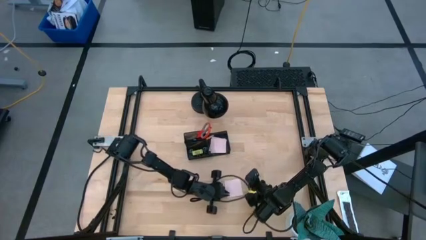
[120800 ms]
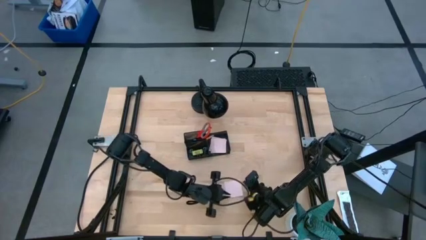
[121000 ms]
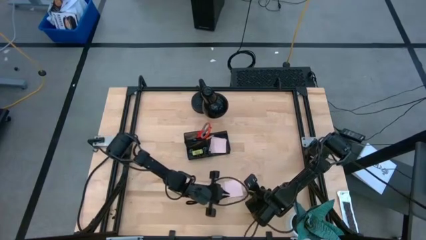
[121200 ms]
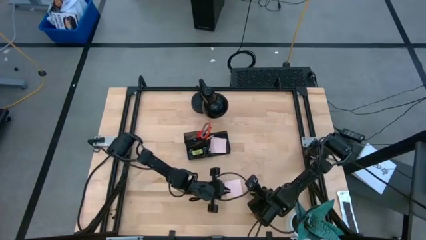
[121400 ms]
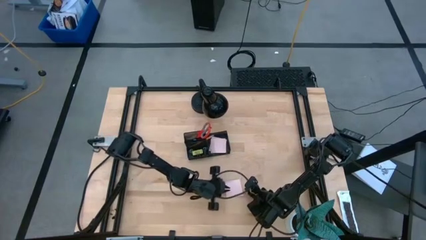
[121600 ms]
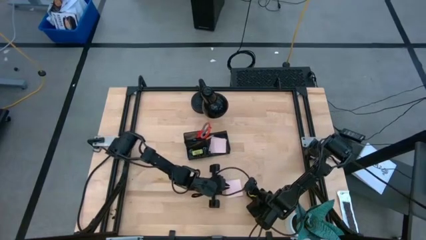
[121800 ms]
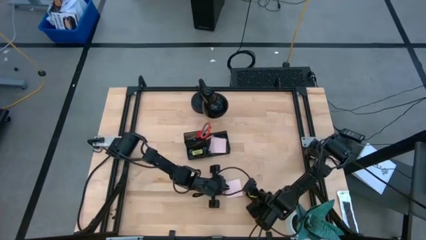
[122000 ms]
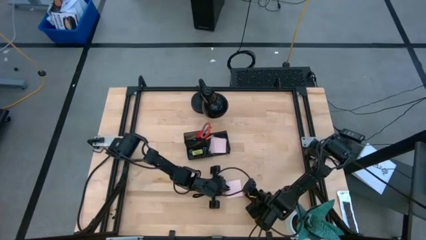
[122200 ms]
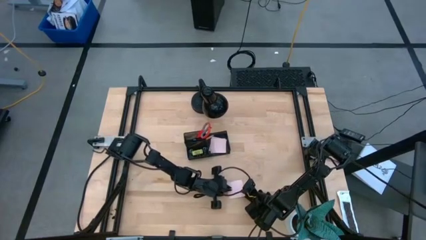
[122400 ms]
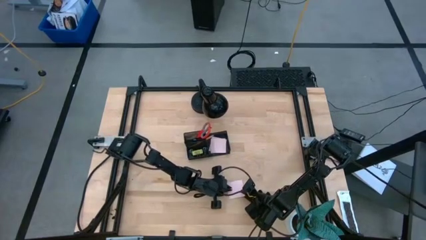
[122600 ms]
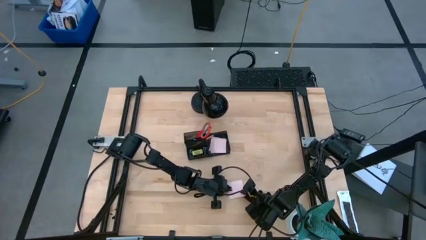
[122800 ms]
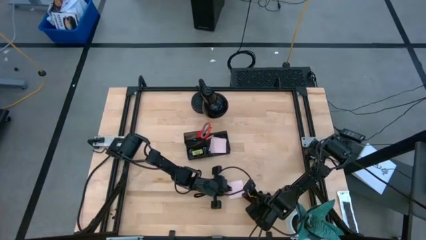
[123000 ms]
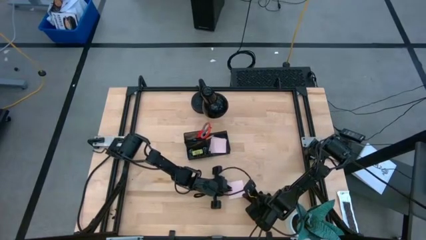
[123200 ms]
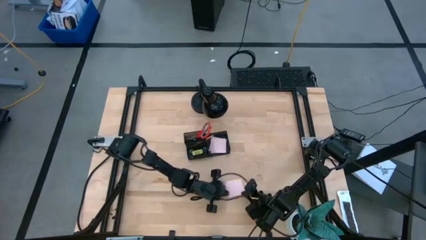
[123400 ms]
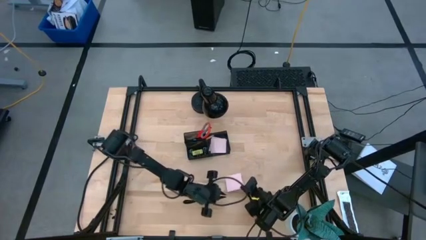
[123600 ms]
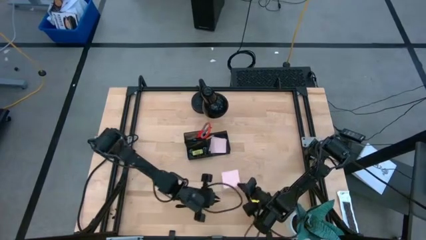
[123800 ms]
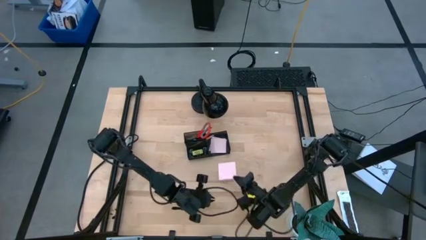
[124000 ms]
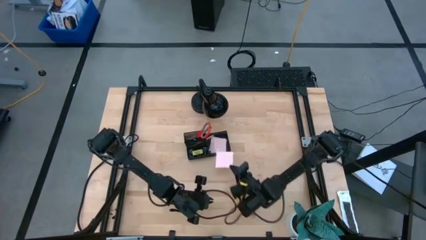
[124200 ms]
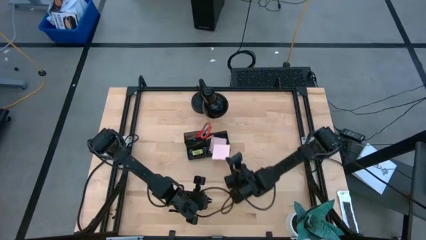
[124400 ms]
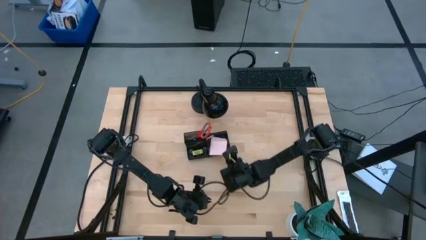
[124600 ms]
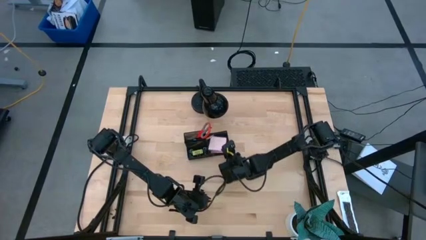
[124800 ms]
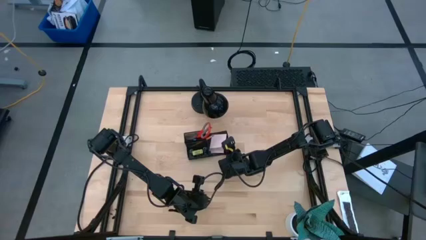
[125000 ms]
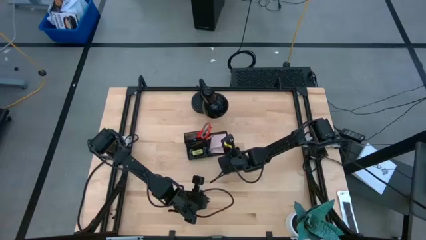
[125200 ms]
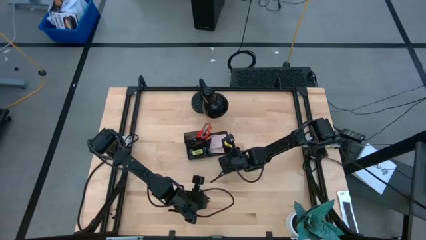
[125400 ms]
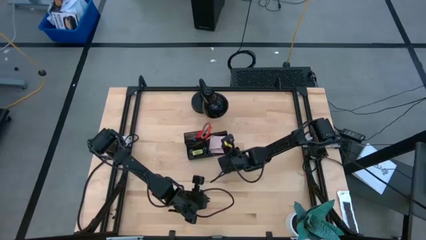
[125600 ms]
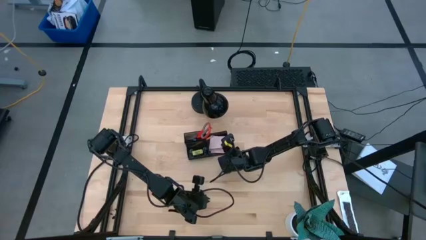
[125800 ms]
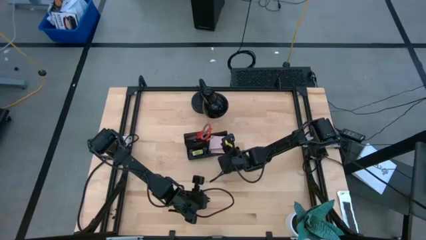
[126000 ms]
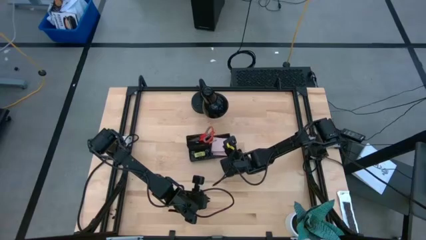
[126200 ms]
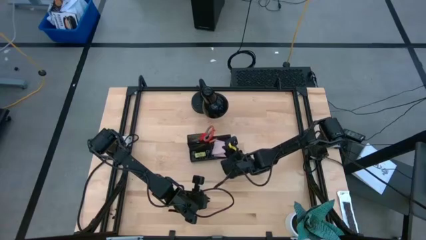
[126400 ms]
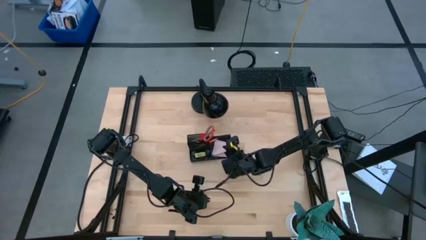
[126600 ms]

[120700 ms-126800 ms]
Task: Pick and place office supplies into organizer
Put the pink sticky notes into the black desk organizer

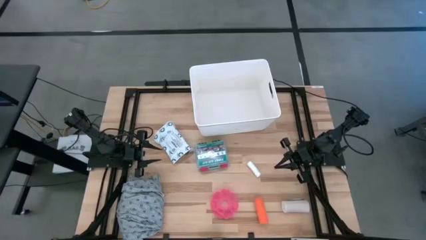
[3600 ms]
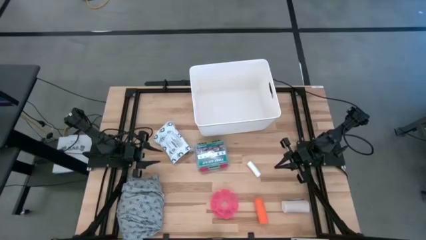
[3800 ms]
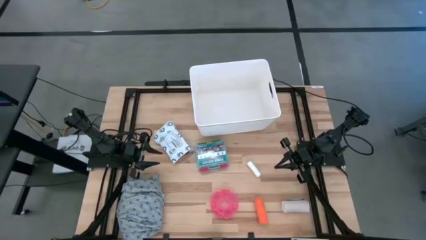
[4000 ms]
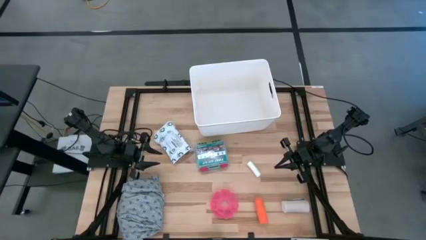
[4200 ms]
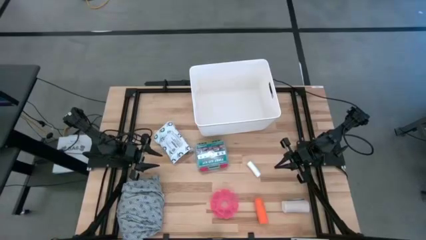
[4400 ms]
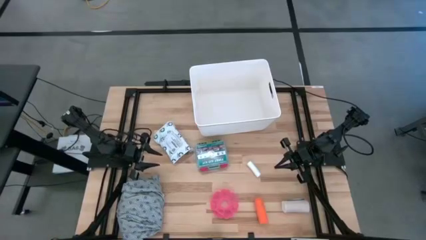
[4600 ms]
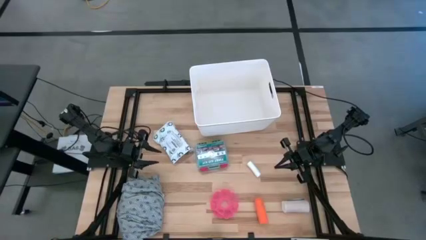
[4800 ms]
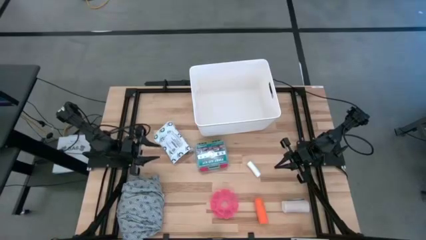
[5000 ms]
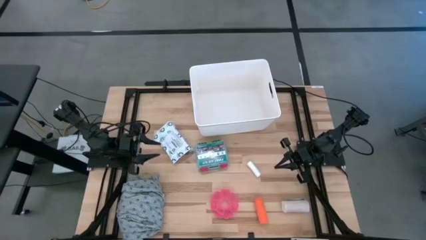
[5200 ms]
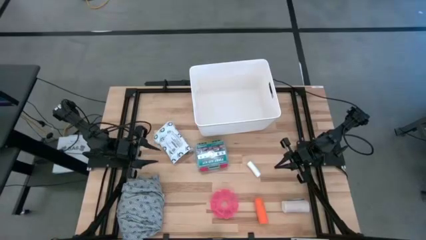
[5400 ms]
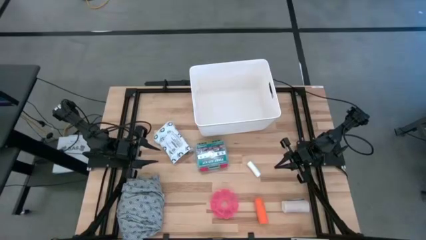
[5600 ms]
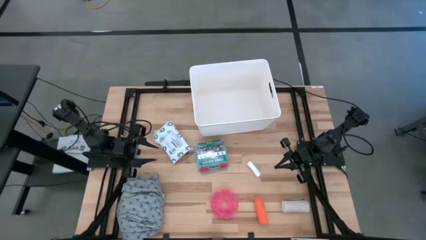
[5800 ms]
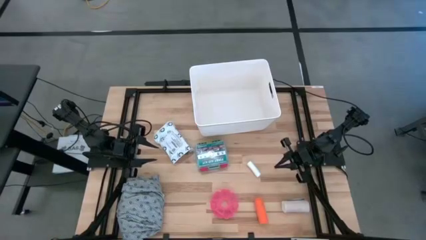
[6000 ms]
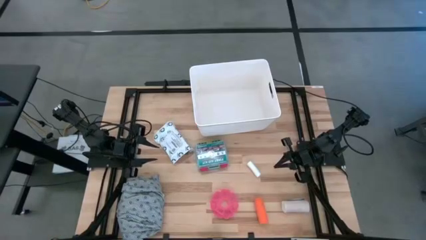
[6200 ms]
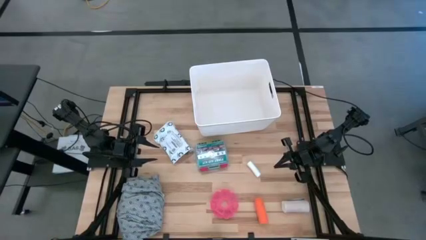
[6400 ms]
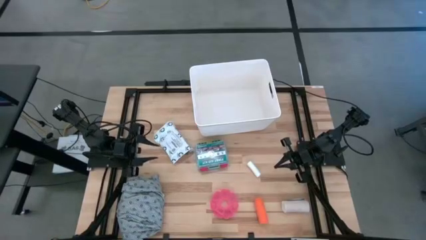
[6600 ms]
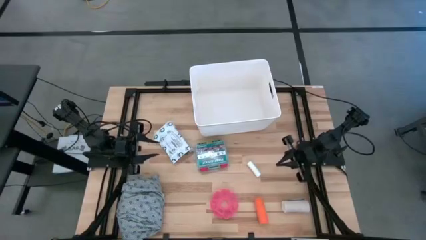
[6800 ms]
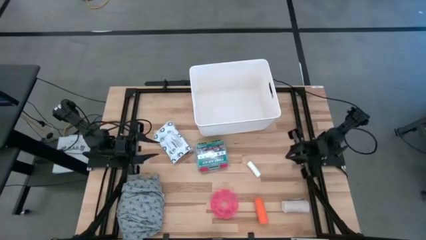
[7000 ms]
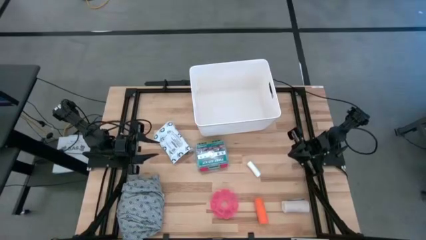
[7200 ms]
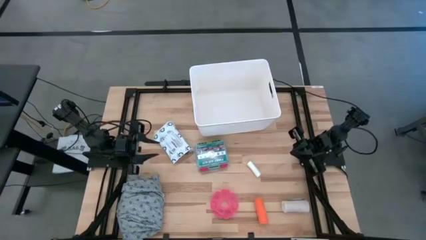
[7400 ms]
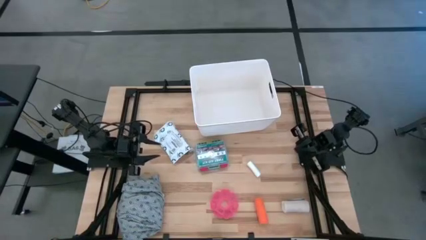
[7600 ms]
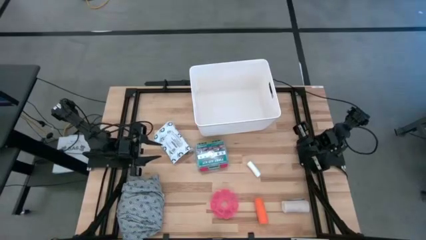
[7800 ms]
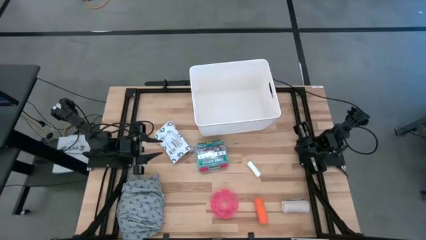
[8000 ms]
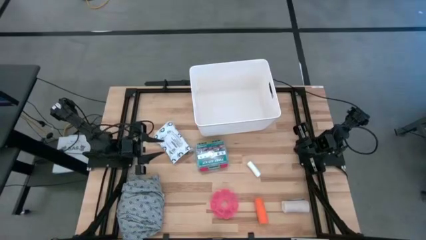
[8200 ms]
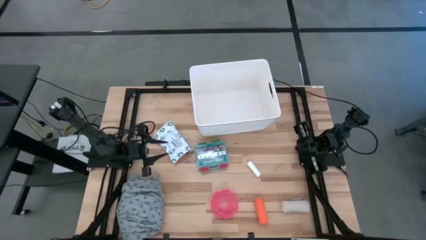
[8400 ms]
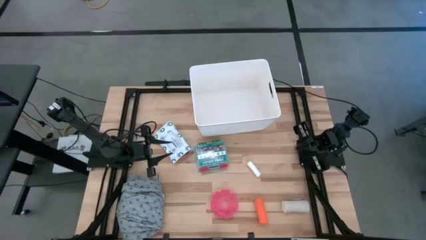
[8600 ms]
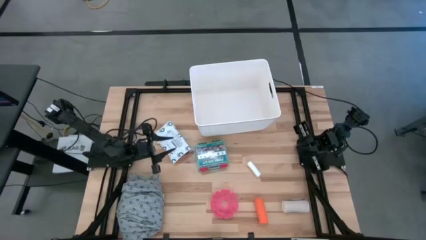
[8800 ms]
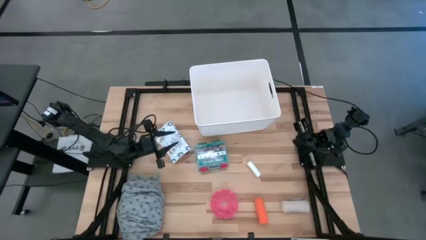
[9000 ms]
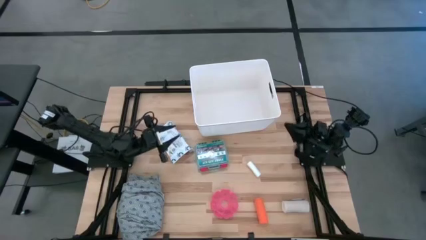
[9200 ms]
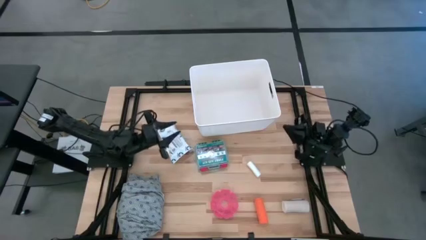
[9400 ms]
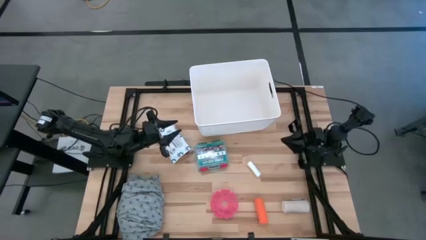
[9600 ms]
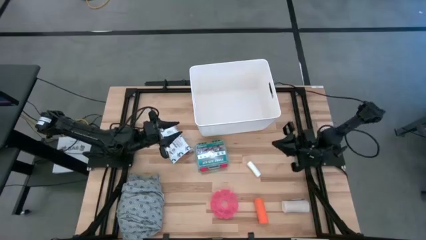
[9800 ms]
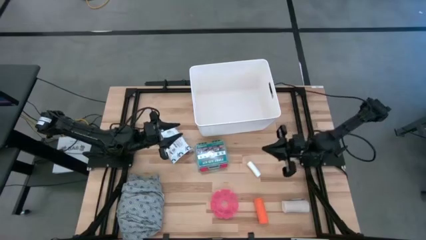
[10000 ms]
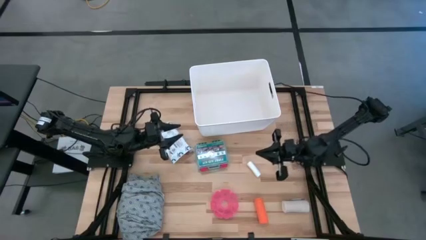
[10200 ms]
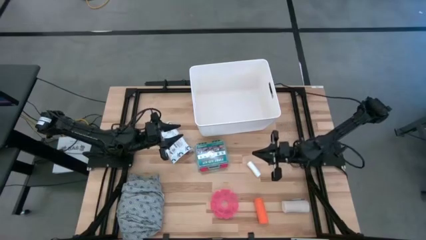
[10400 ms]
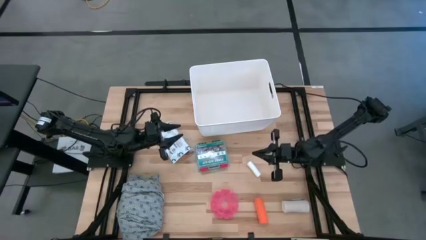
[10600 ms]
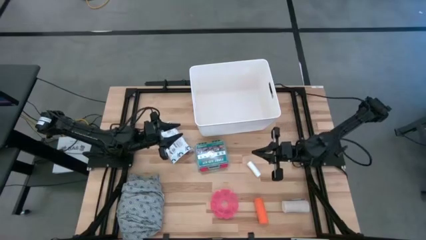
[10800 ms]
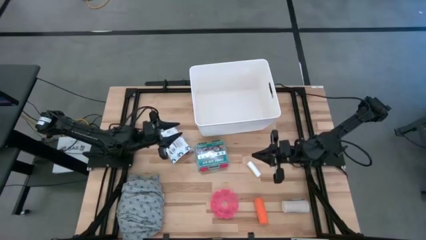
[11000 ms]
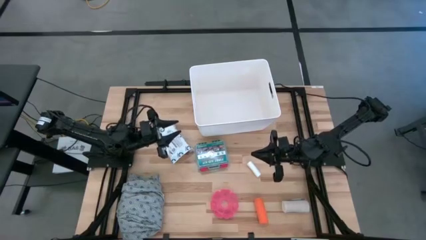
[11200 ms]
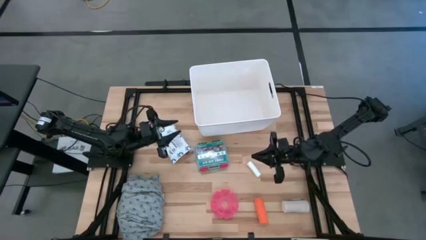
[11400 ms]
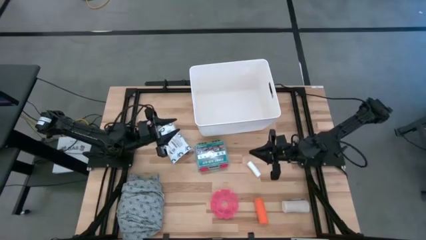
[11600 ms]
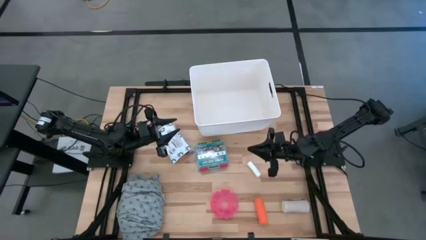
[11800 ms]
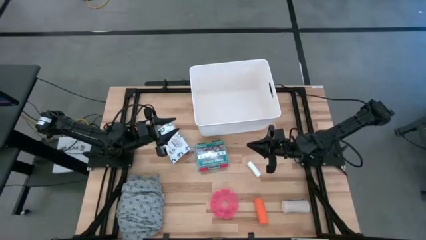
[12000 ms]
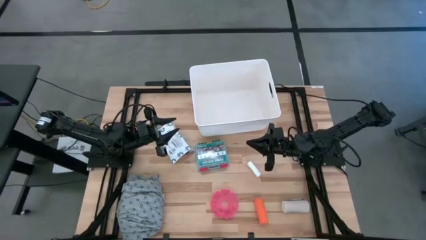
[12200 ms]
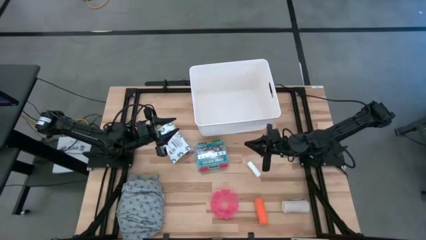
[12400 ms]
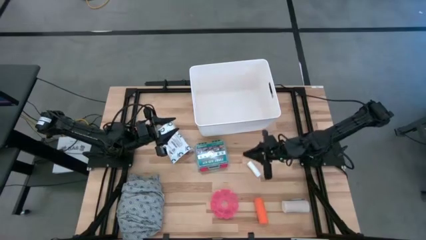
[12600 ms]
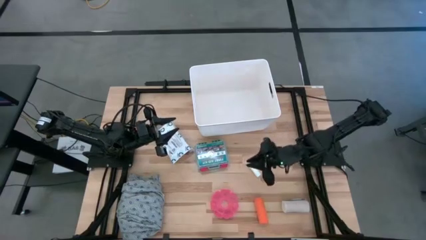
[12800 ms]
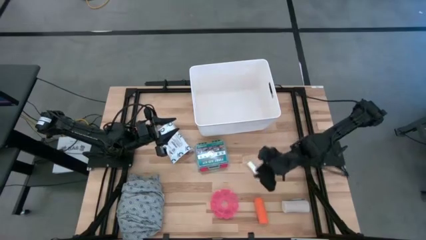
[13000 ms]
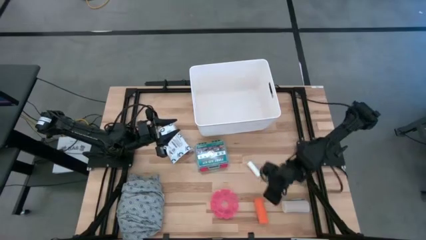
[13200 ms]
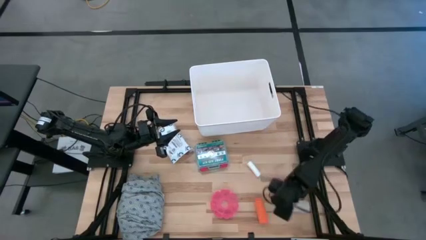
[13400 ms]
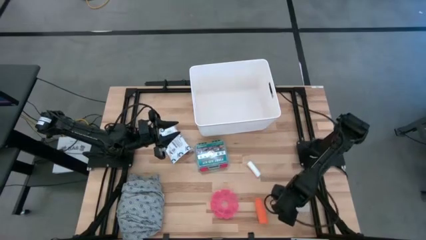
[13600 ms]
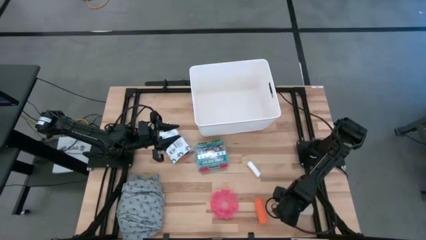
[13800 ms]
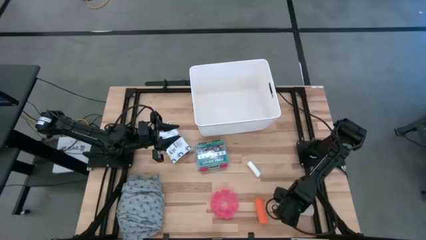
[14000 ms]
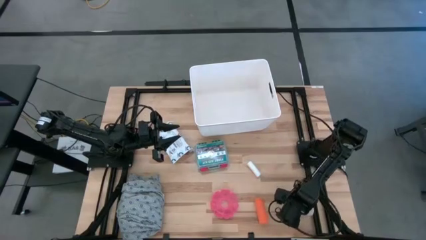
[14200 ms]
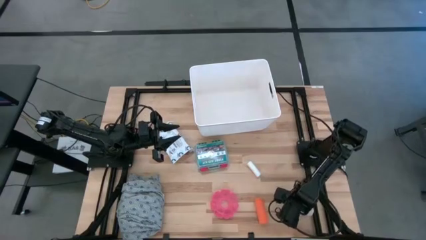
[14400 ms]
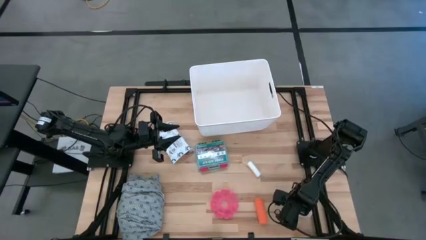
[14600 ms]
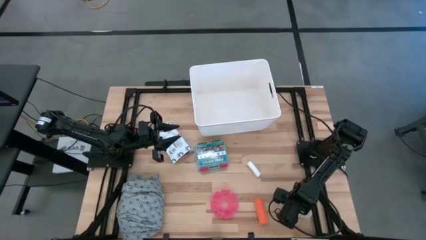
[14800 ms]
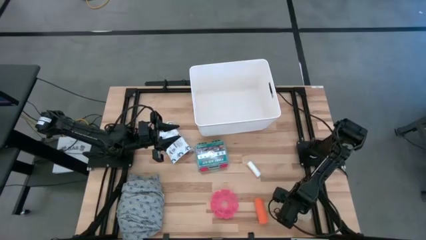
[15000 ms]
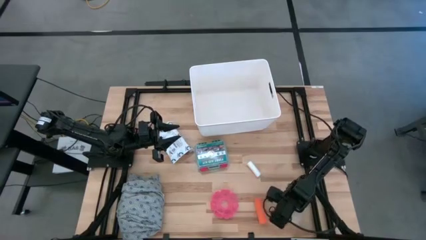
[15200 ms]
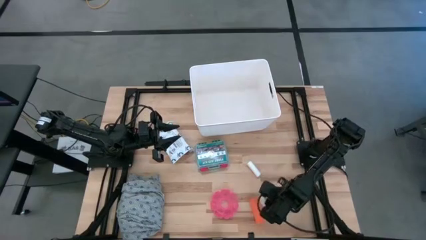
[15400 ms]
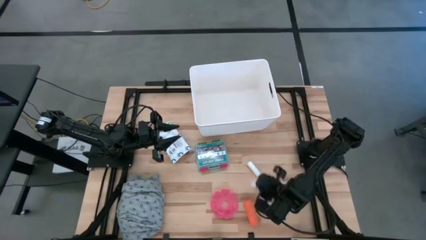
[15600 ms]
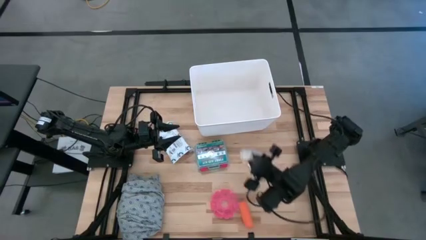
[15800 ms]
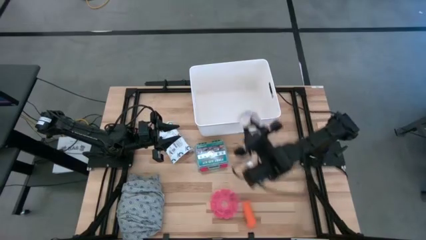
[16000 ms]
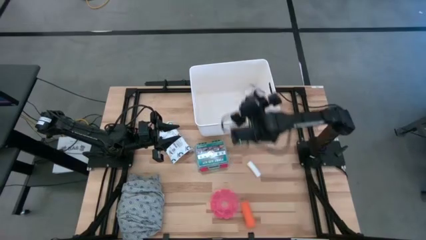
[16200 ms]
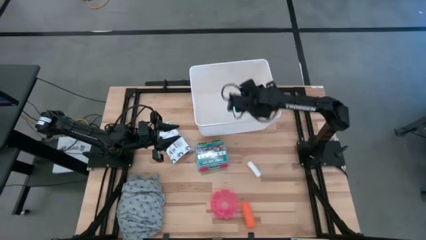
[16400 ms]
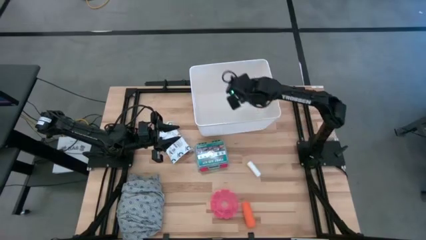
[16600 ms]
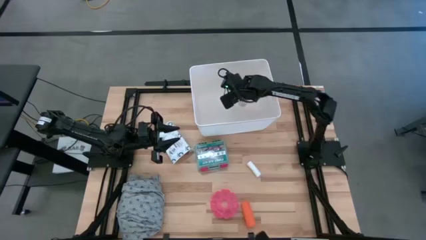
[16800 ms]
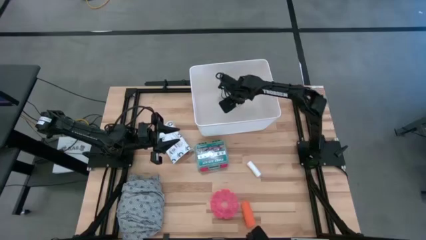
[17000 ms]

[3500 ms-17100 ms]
Task: Pick & place medical supplies in basket/bin
Put the brown bandage into the white bin
